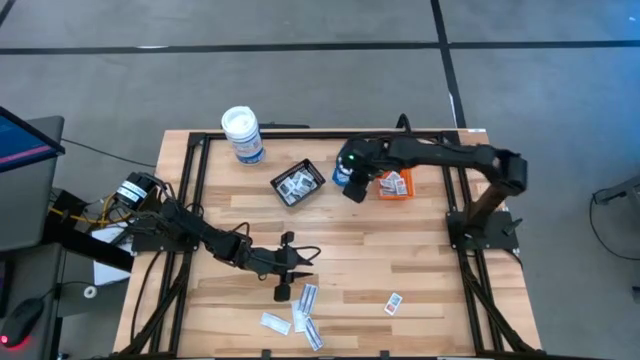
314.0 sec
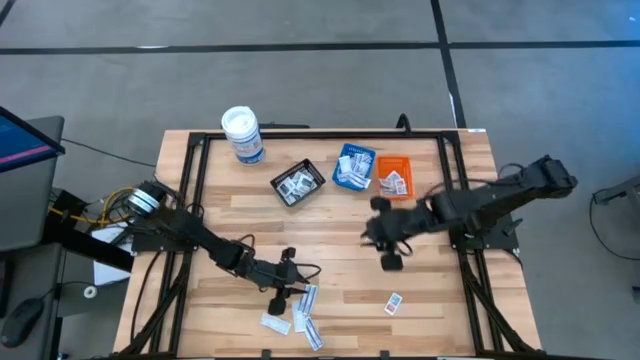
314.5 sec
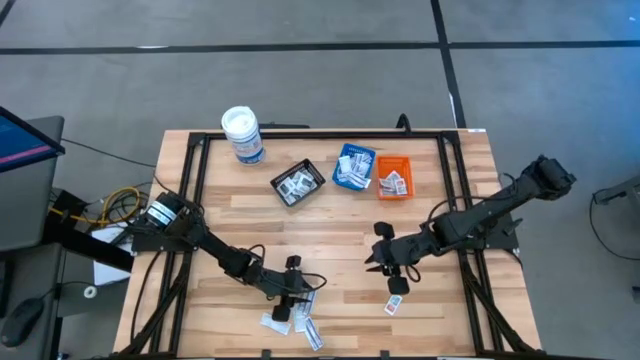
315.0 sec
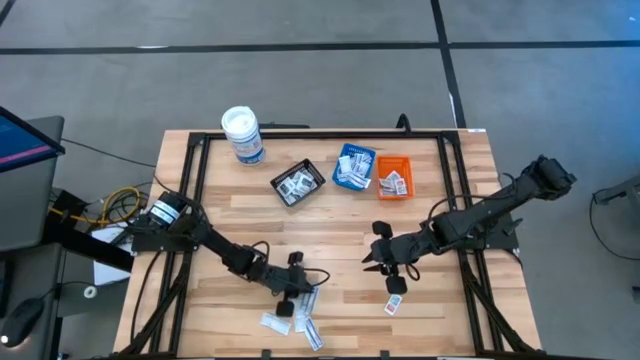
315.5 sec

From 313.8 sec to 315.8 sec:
Task: Pick & Place First Aid Supplies
Put the blue bandage into the blue bin

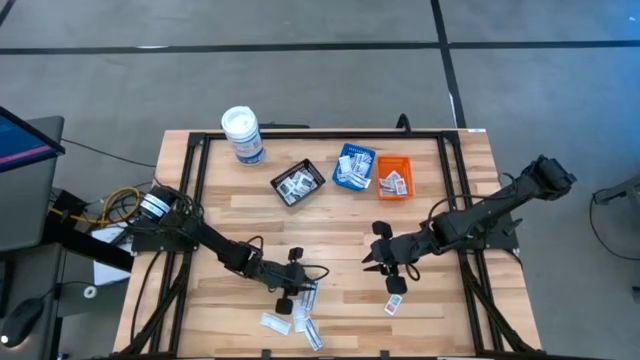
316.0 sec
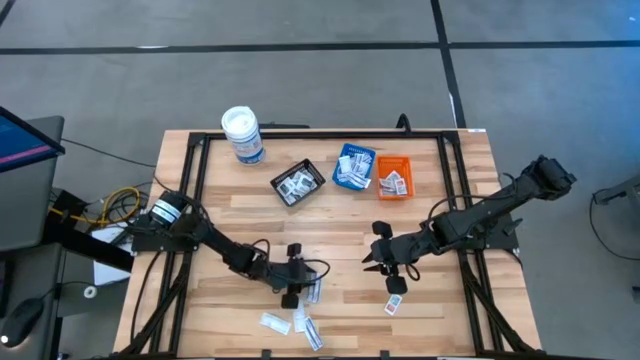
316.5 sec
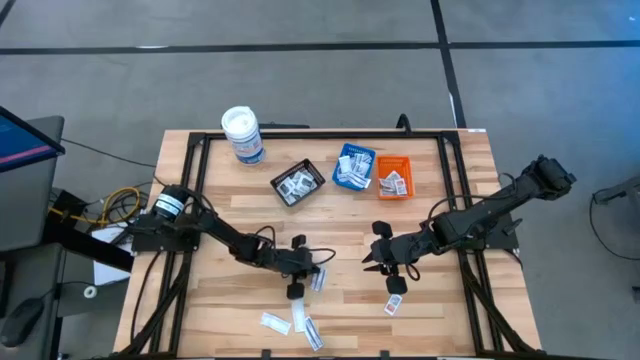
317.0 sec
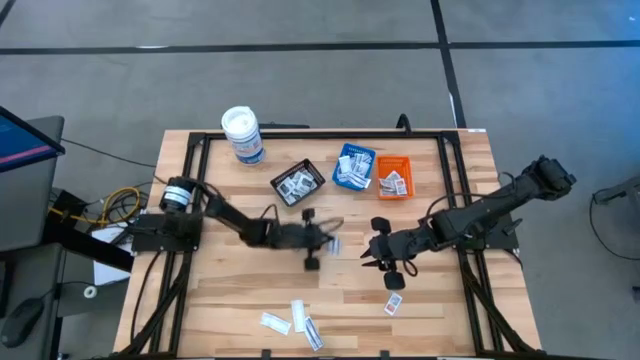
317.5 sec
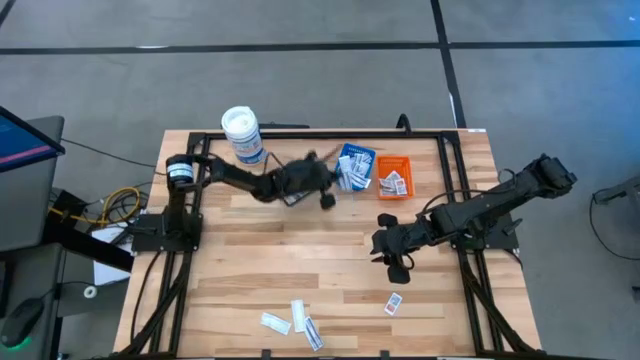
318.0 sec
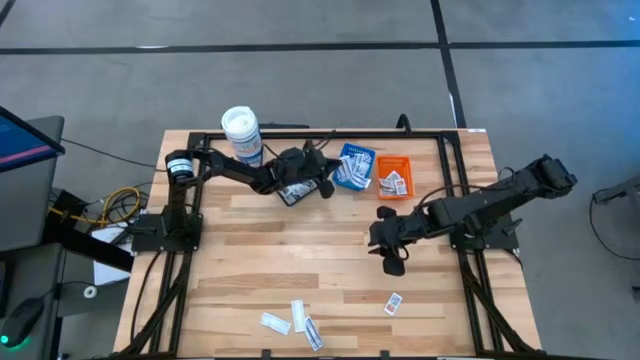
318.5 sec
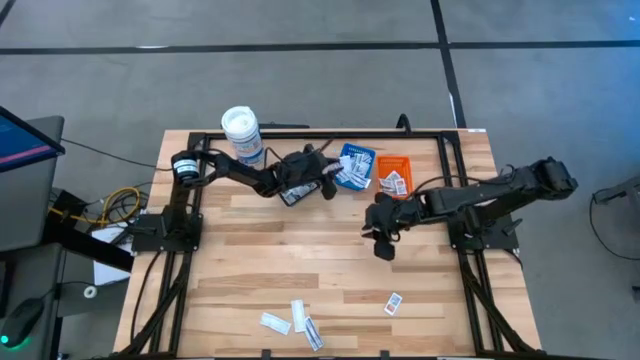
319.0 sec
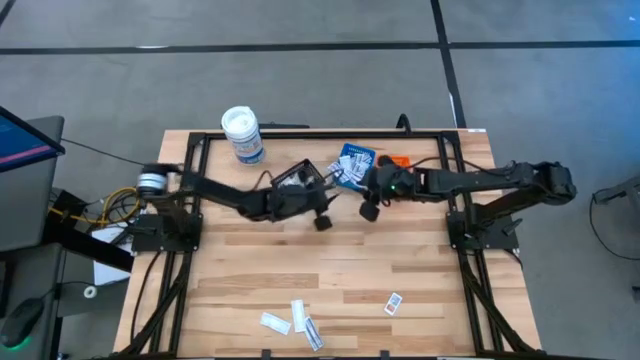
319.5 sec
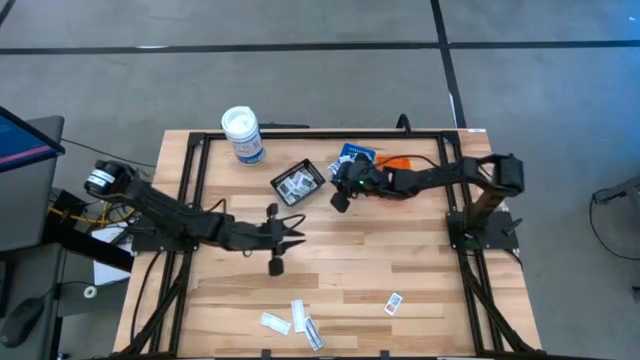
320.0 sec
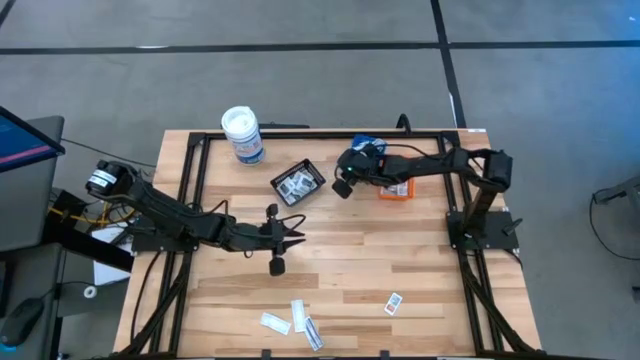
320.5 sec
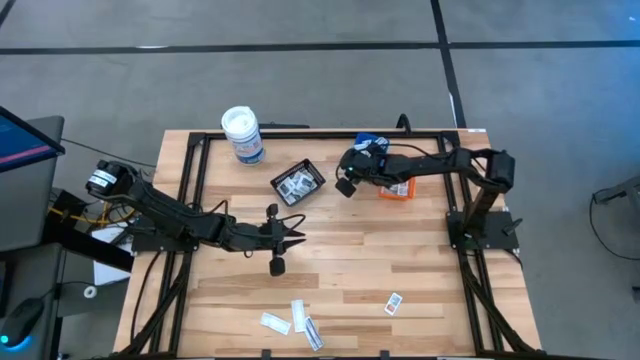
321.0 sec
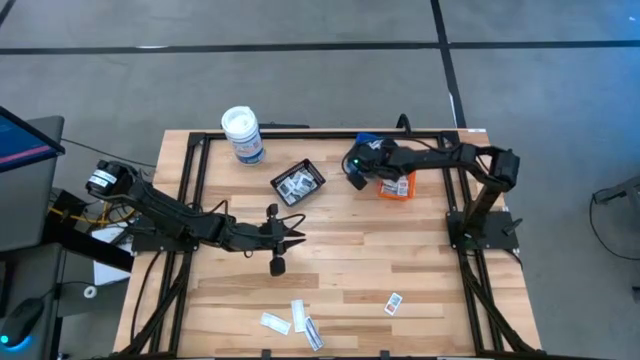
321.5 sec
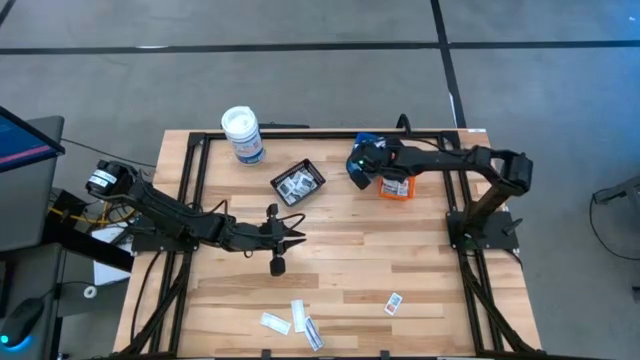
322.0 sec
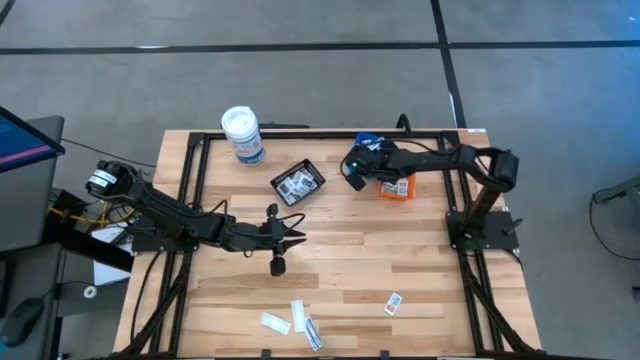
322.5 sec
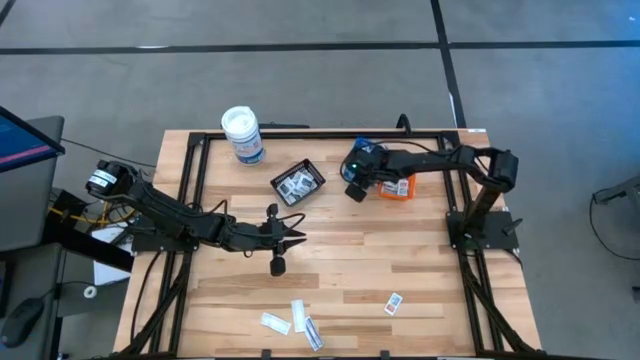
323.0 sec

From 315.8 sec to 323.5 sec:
Put the blue bandage into the blue bin

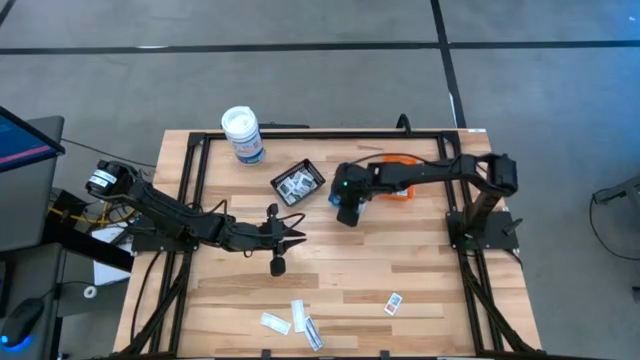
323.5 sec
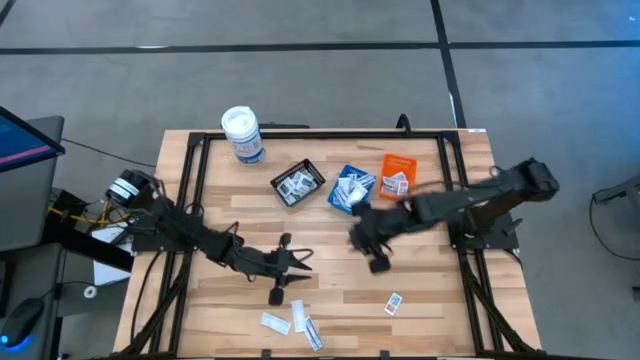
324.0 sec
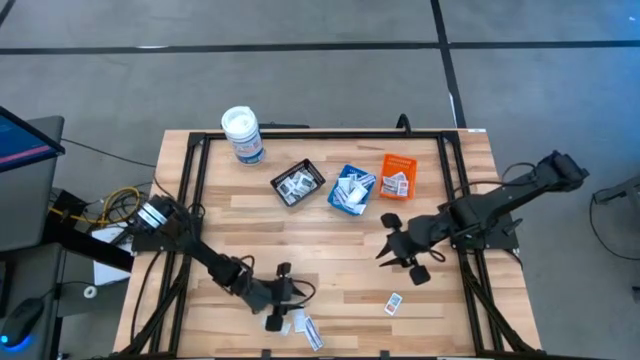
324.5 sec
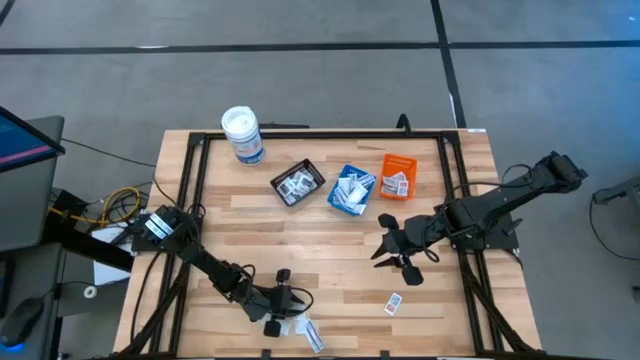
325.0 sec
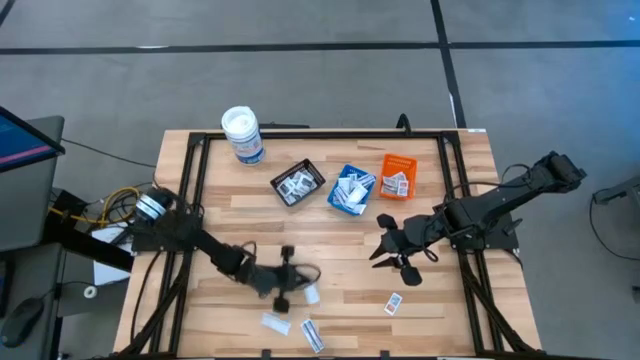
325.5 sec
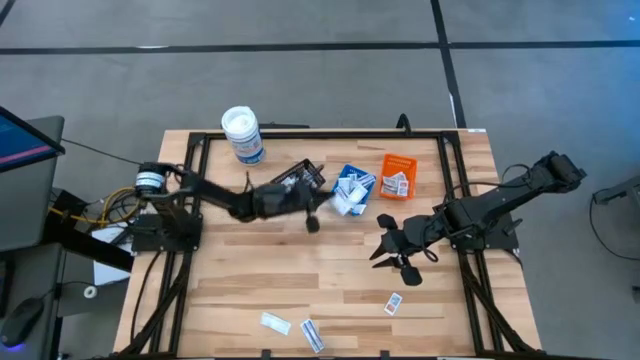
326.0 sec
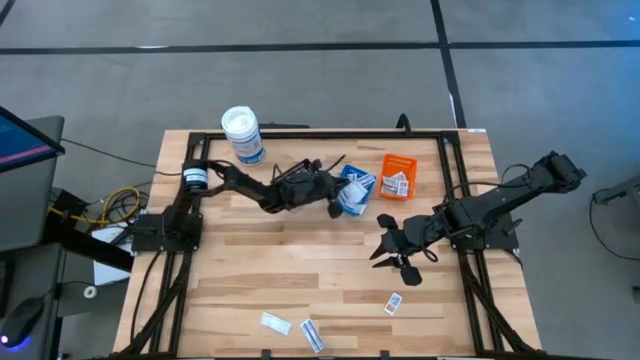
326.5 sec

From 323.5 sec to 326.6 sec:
Put the blue bandage into the blue bin

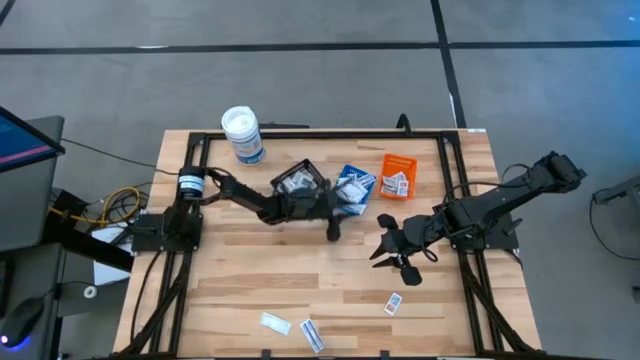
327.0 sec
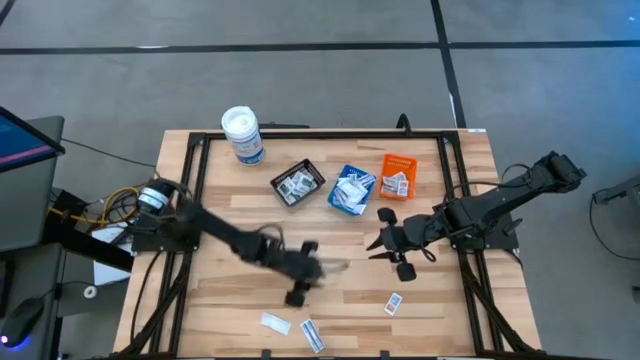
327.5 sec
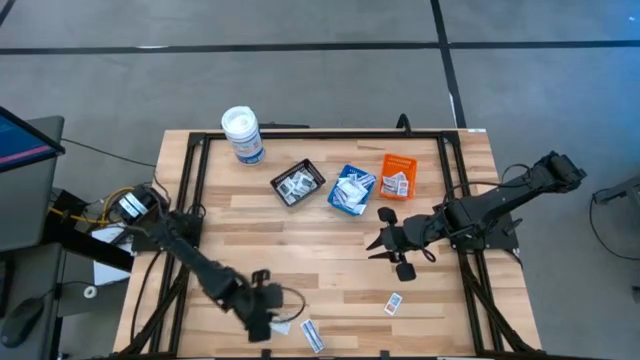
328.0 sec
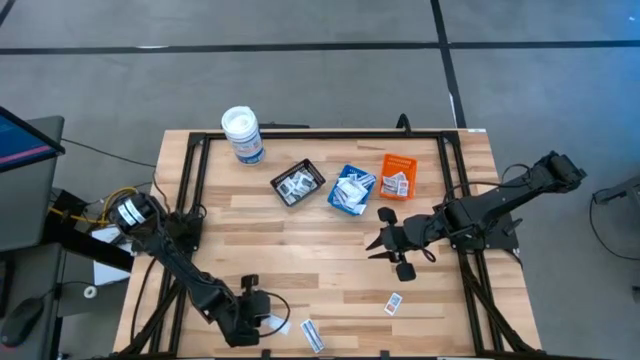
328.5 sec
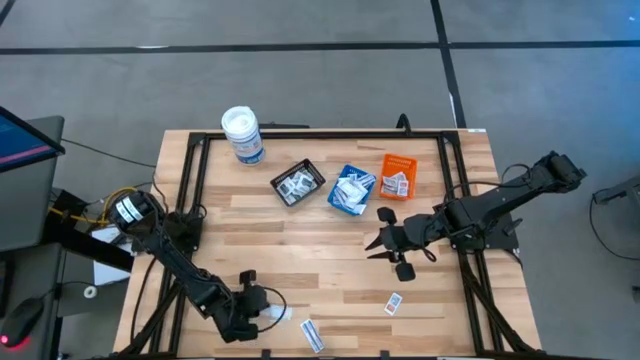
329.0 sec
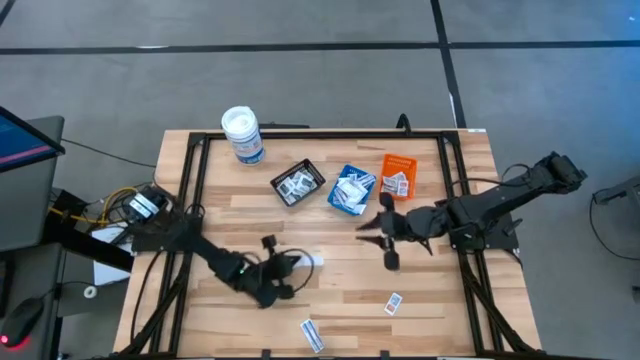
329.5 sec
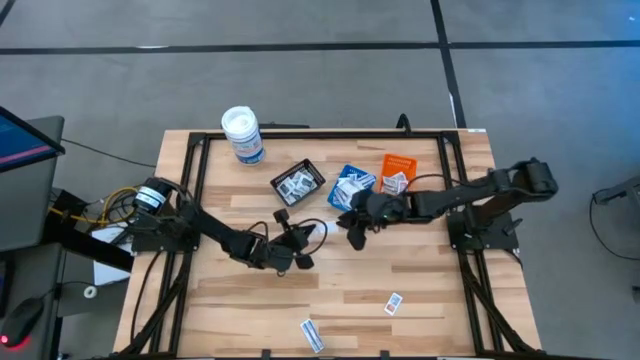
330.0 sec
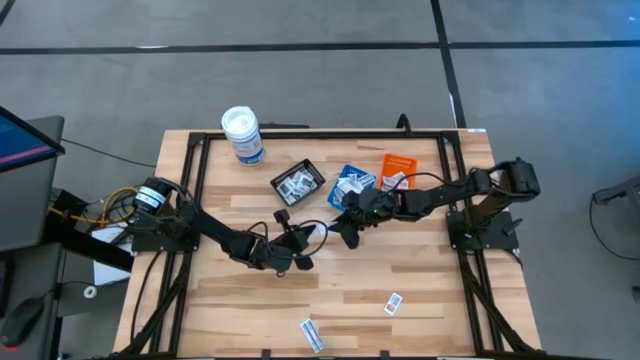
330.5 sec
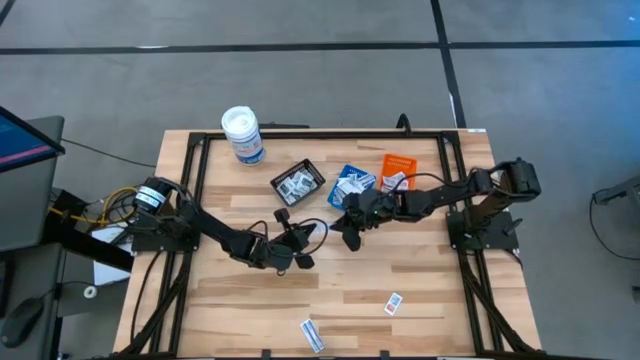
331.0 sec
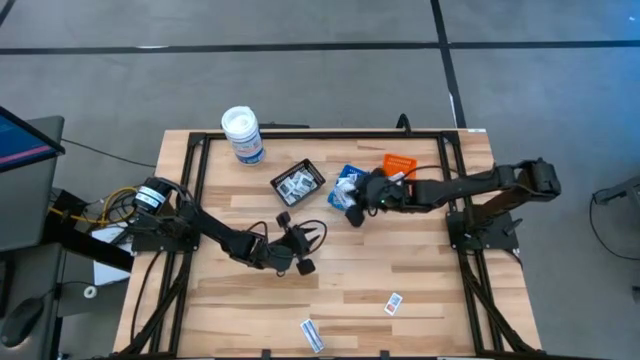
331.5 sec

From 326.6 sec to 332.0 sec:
Put the blue bandage into the blue bin

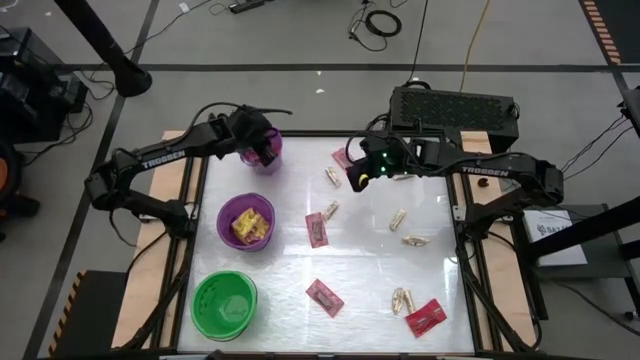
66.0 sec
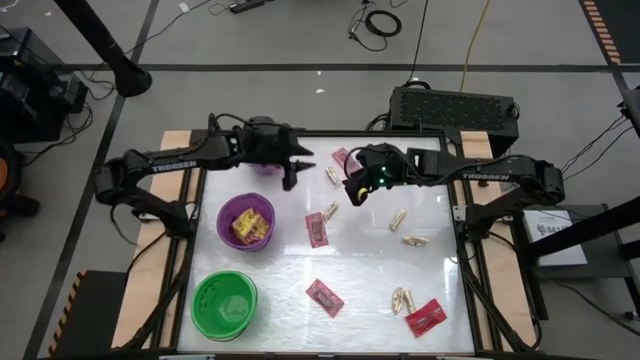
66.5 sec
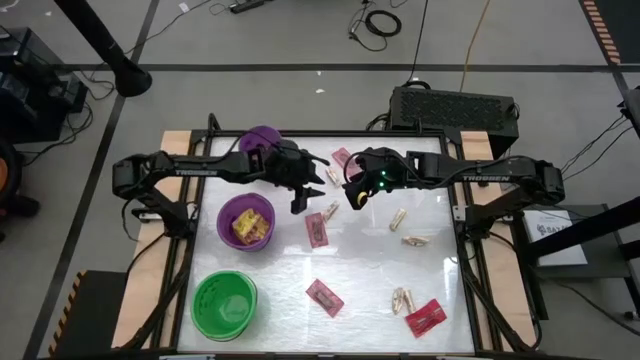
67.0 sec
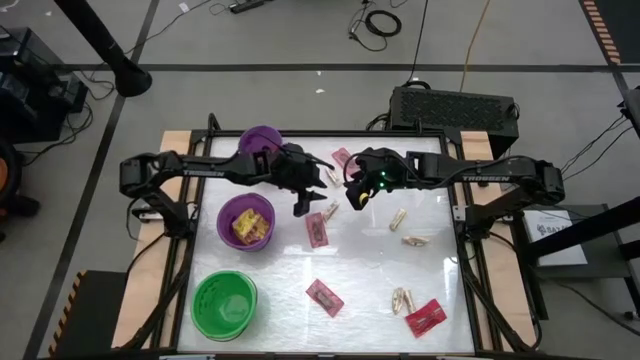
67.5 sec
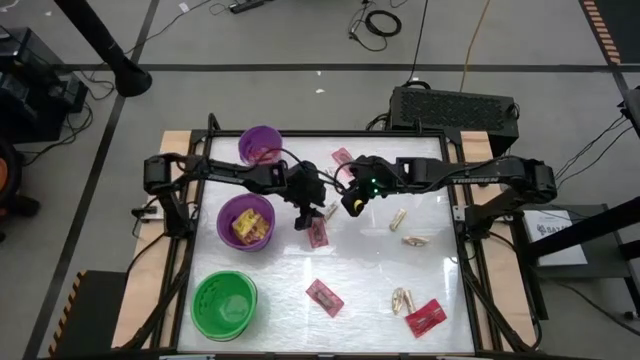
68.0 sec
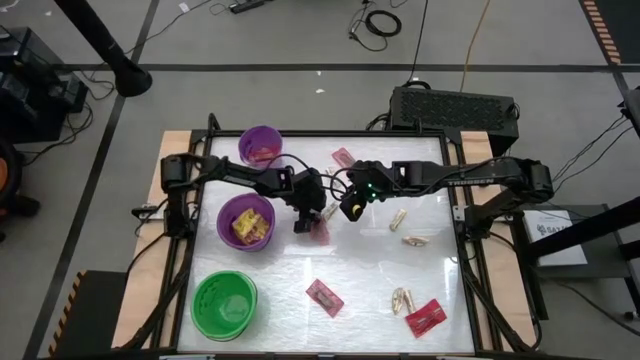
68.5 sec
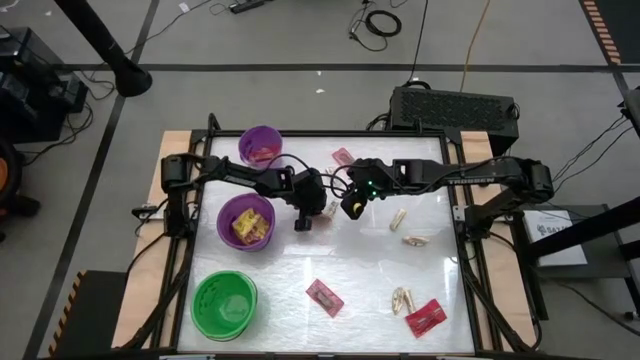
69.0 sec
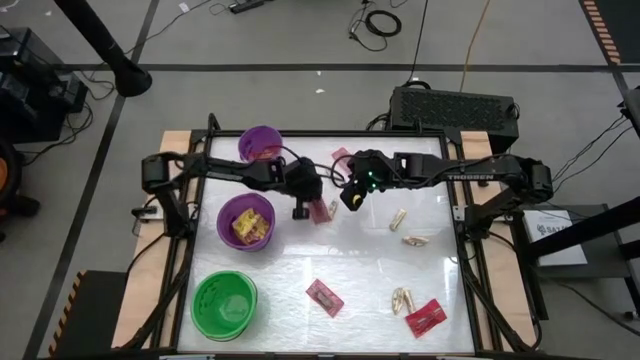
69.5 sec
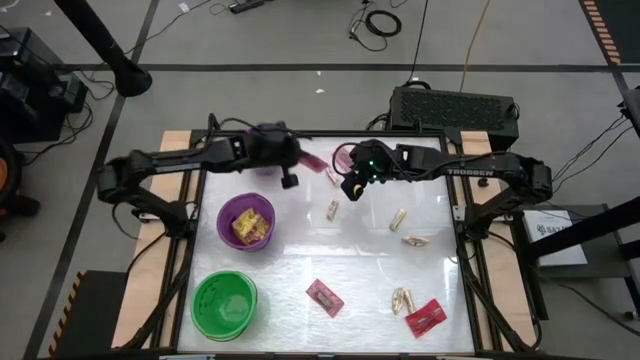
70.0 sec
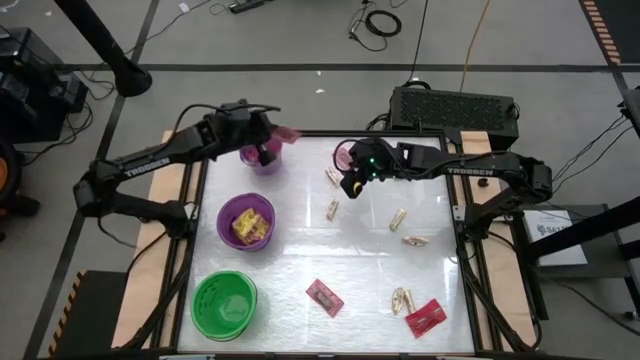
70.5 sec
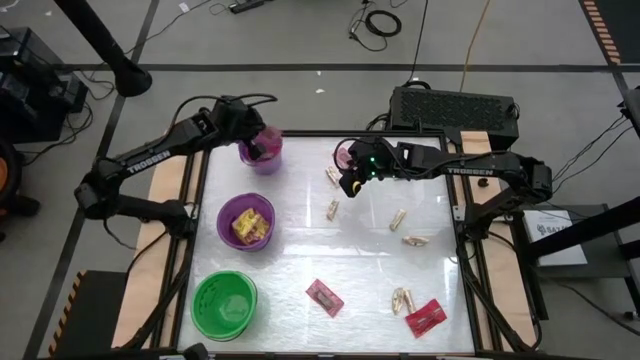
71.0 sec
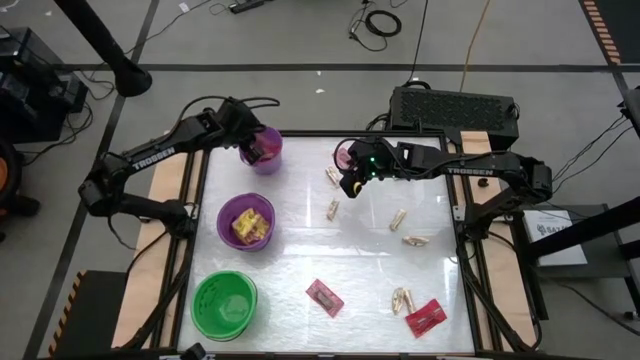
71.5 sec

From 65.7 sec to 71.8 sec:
Task: Sort candy by brand, put in halloween buckets
Put the red candy into the top purple bucket
